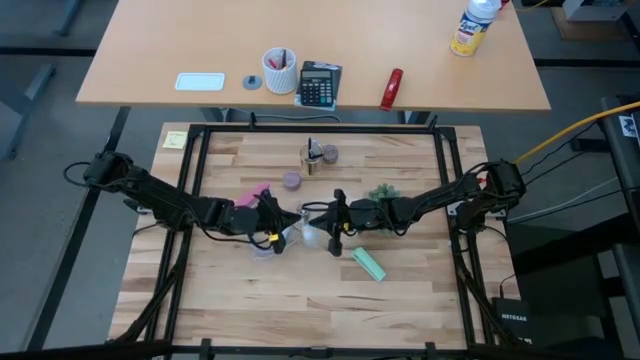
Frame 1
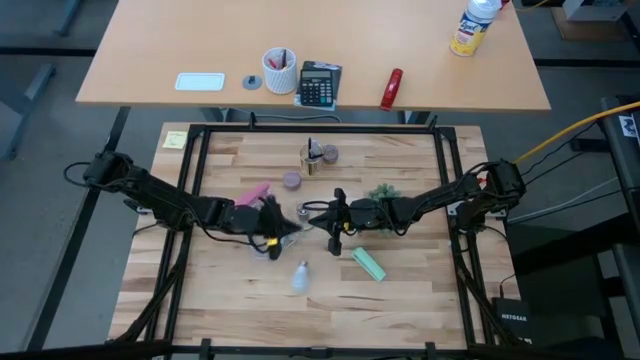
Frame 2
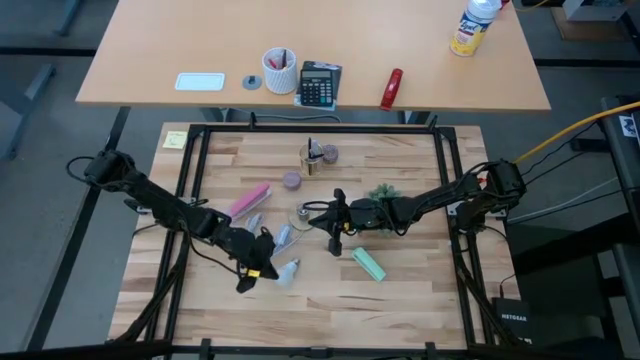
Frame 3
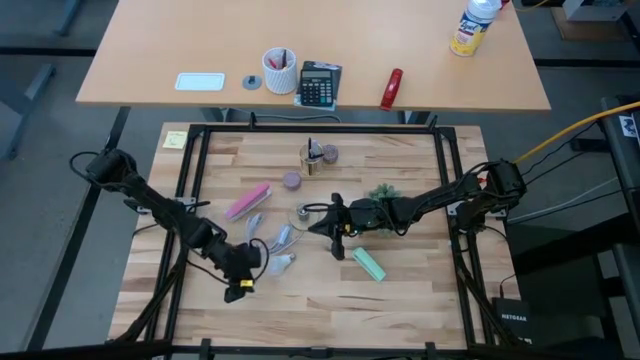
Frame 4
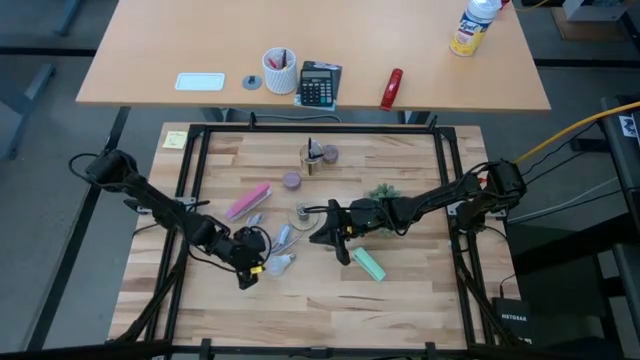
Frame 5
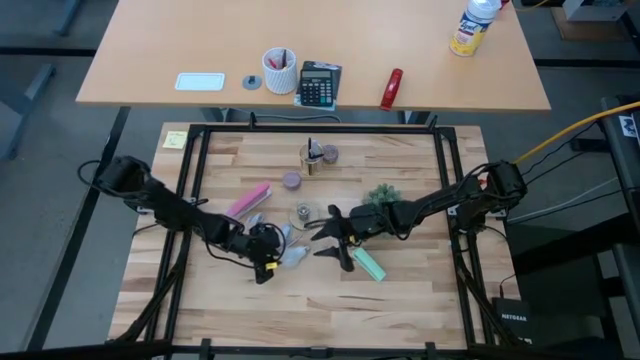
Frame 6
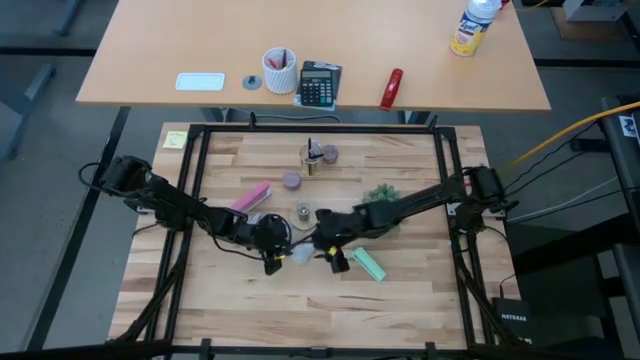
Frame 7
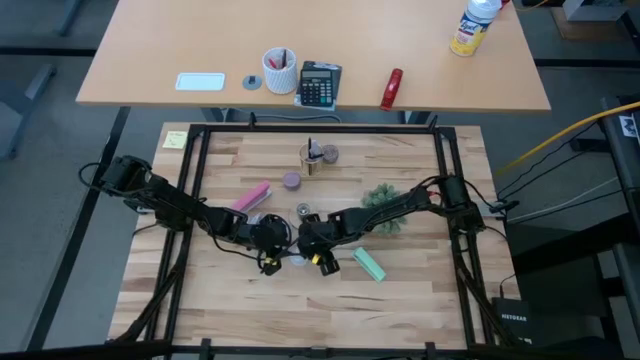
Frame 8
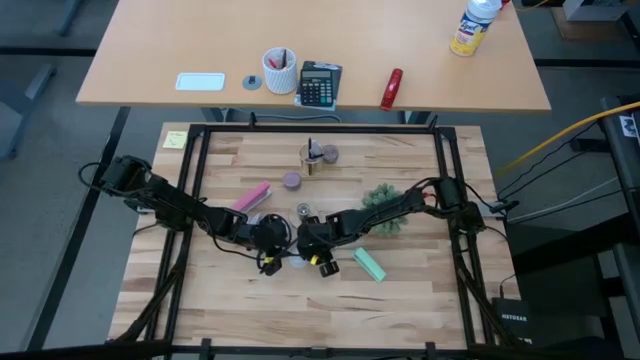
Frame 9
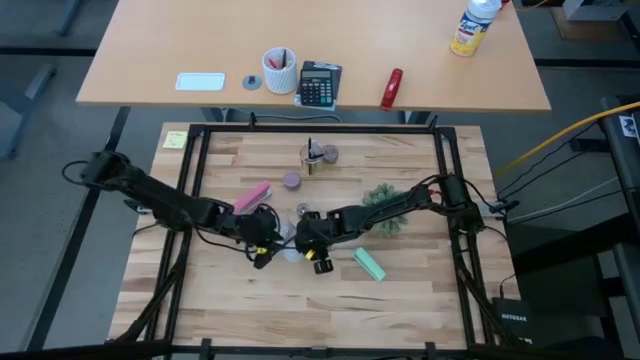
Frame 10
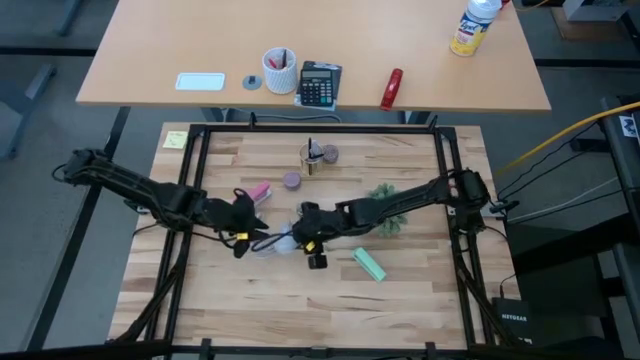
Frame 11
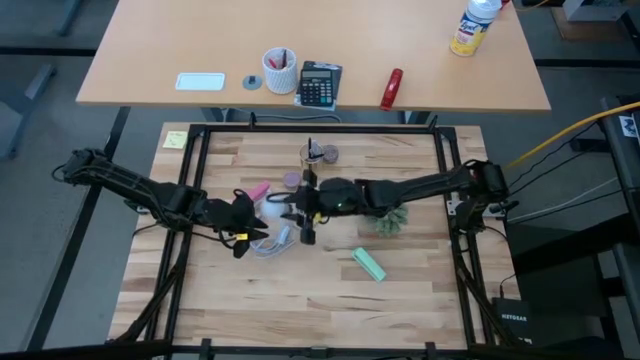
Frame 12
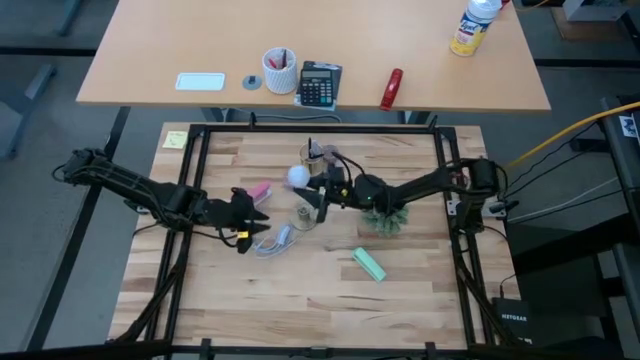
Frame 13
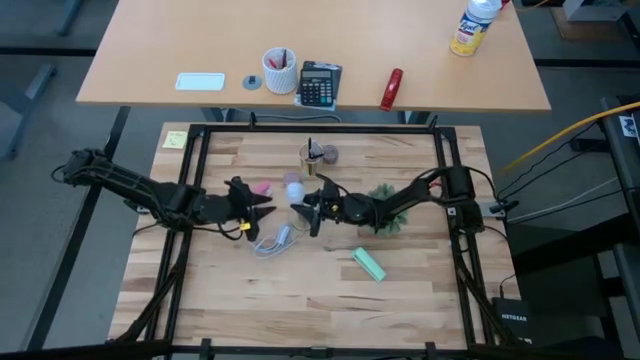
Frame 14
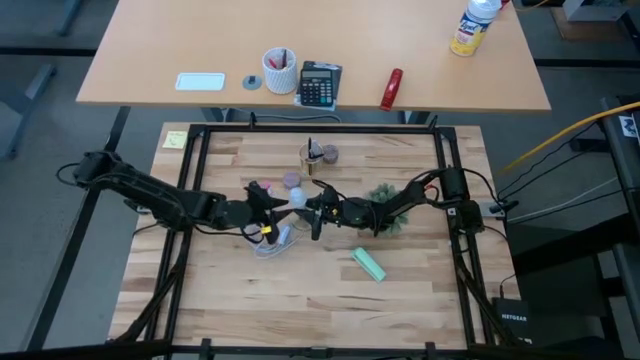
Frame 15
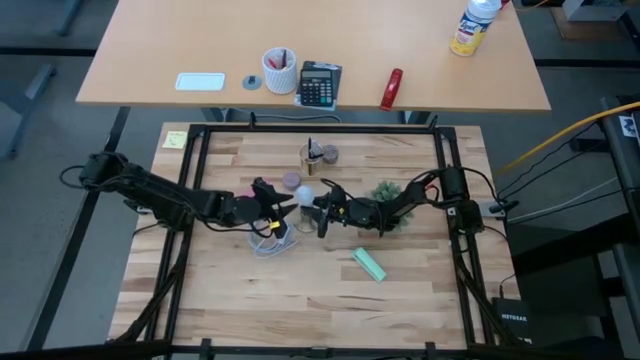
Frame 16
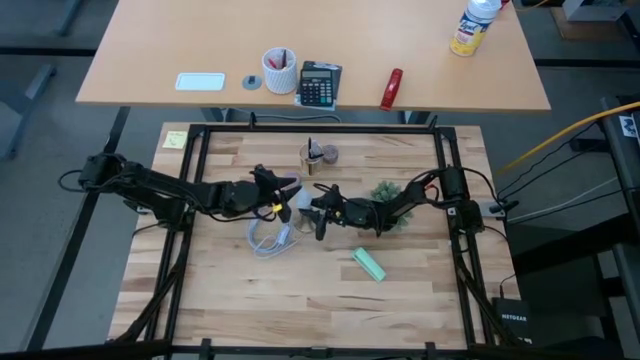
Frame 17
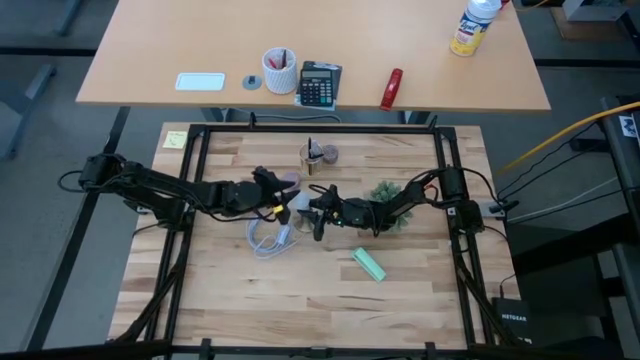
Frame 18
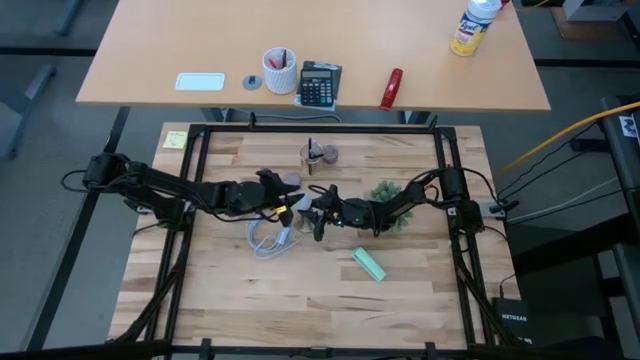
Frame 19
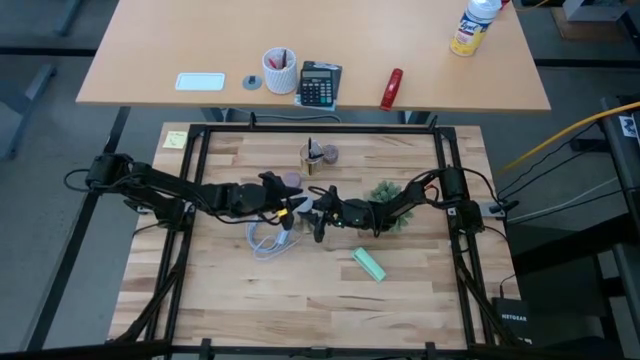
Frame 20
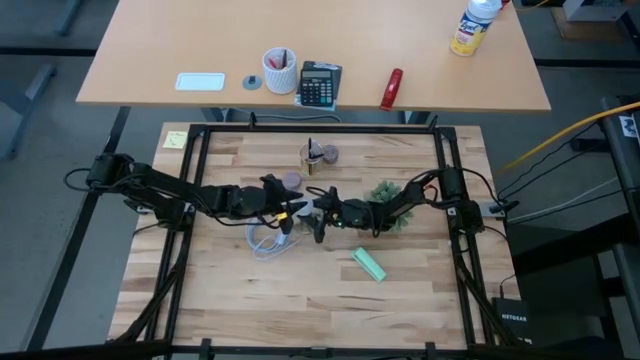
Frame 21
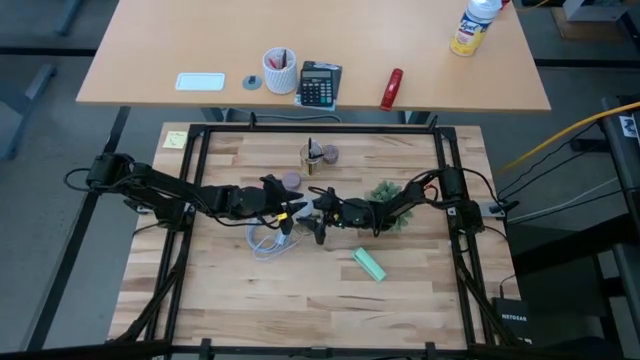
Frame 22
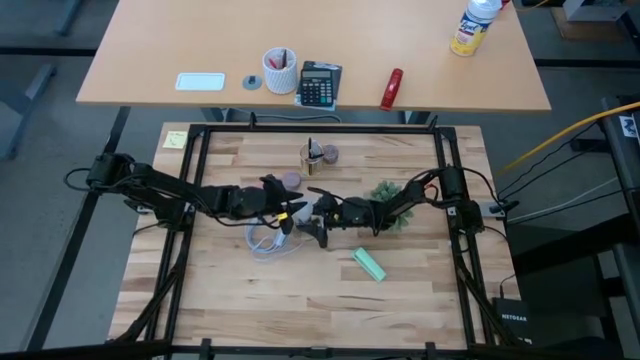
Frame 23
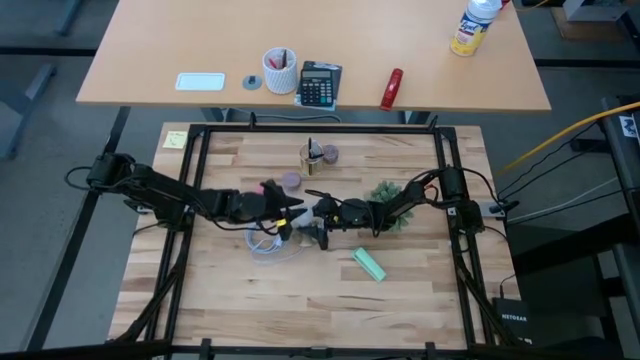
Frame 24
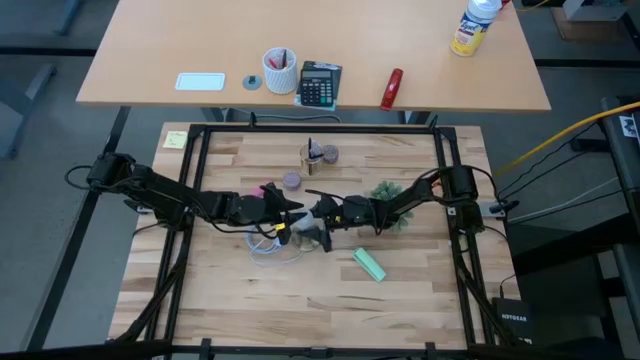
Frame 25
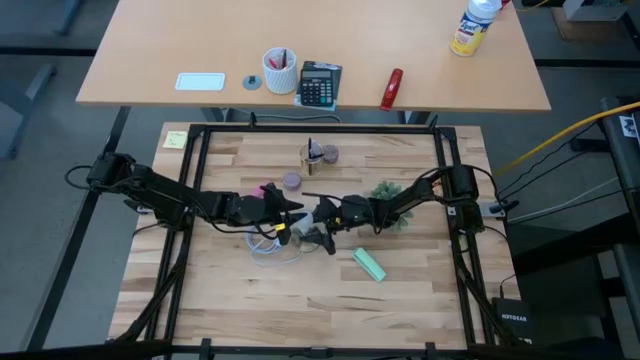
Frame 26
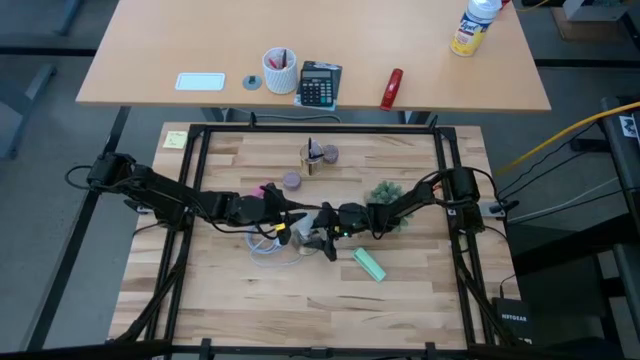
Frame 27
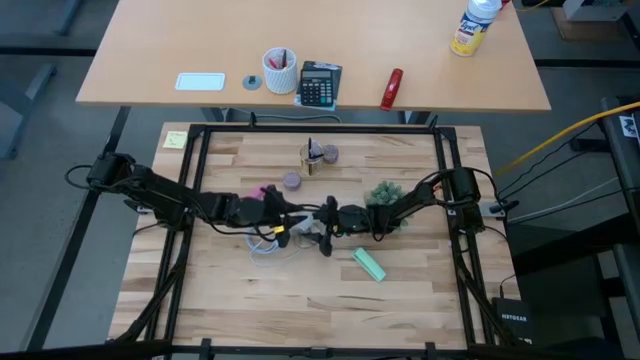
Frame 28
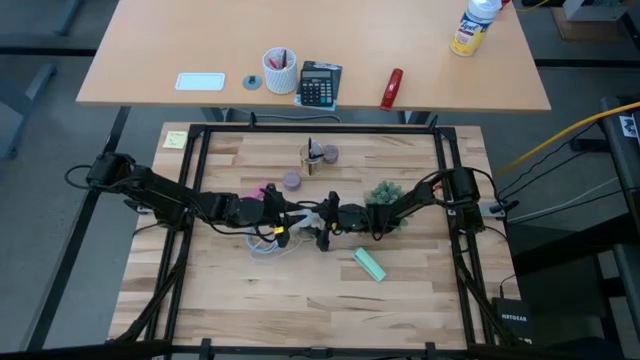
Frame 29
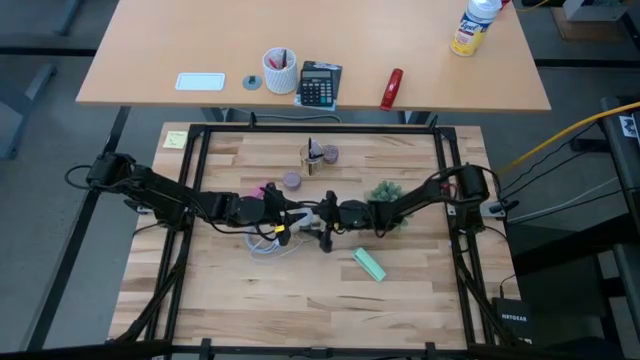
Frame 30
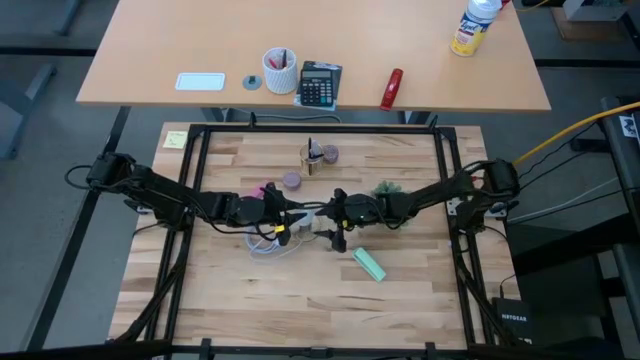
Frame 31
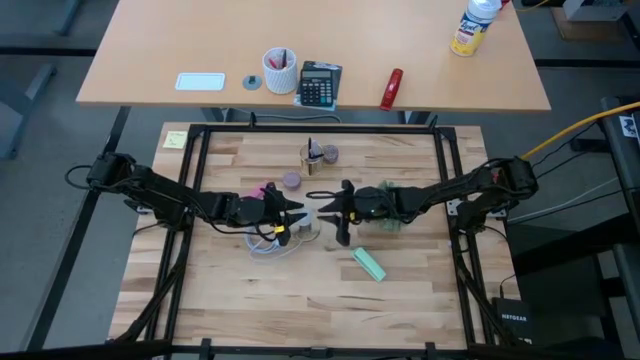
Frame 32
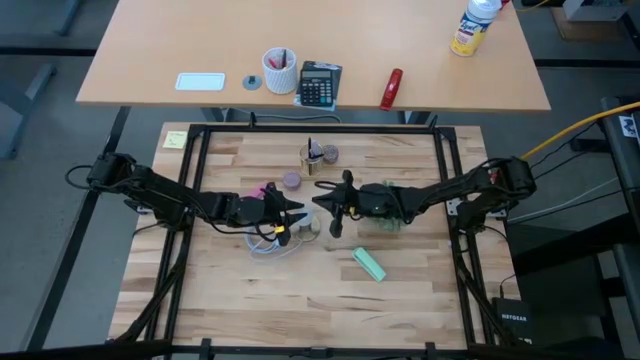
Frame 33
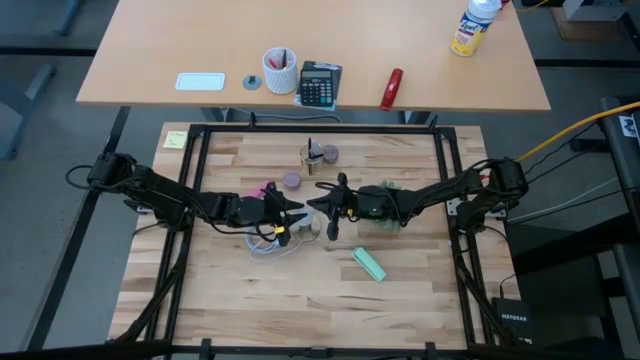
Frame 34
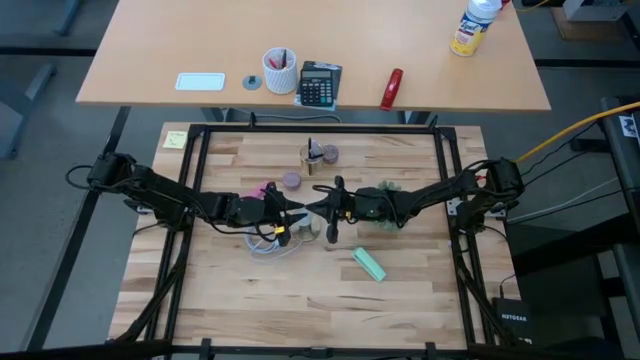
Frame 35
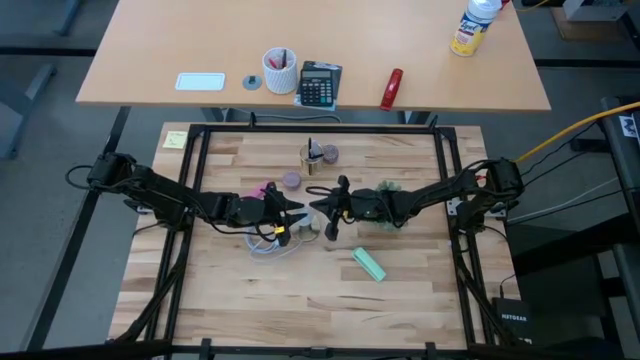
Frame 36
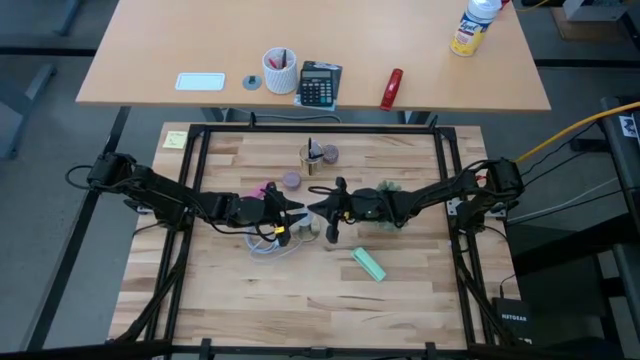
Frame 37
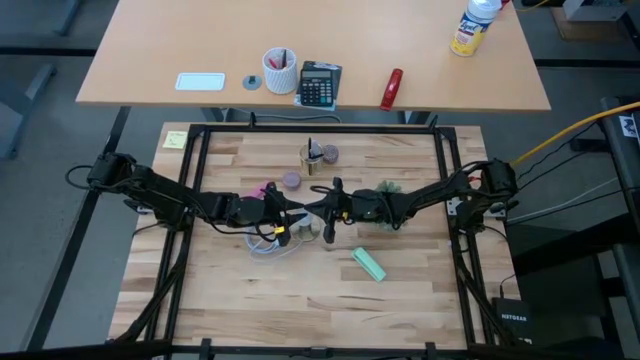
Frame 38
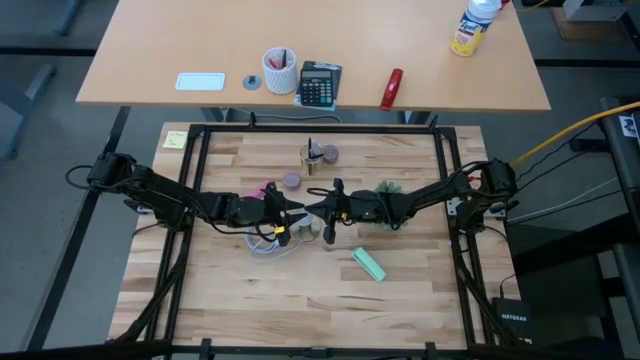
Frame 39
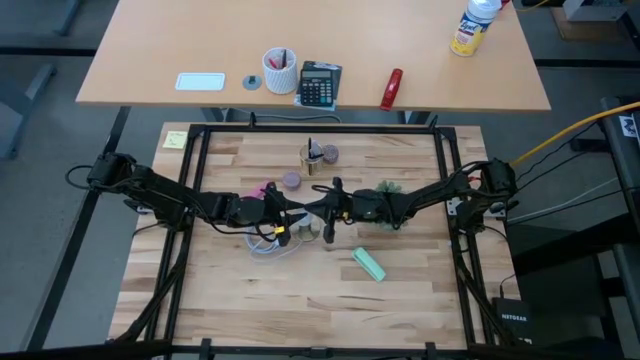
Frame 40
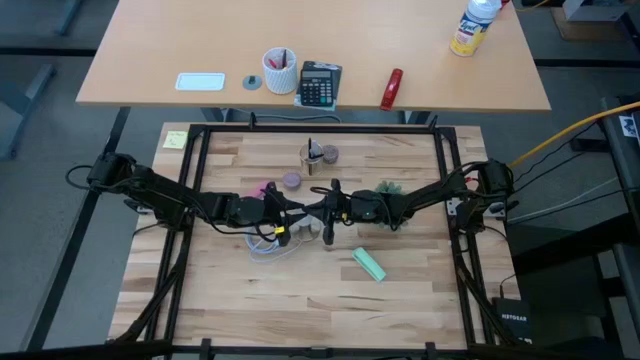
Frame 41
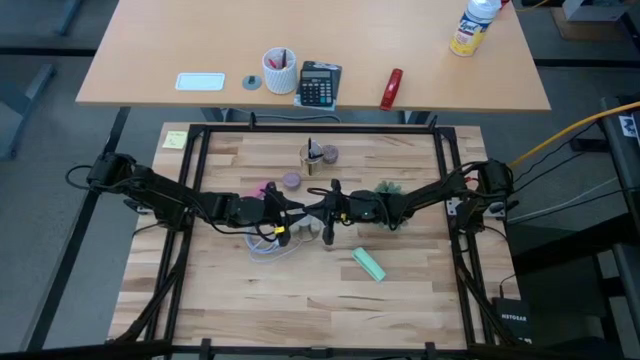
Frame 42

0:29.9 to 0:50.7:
Task: Screw lightbulb
Insert the lightbulb into the lamp
